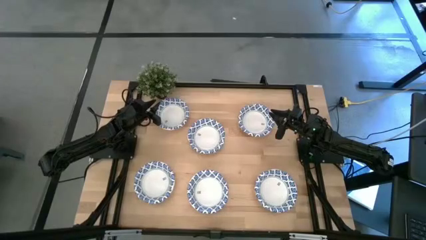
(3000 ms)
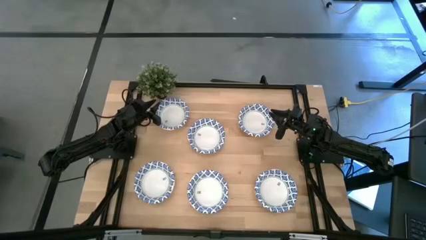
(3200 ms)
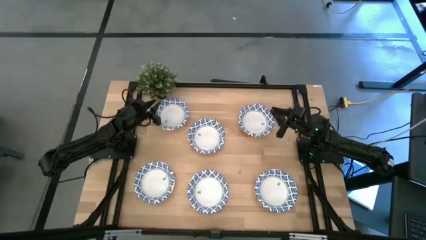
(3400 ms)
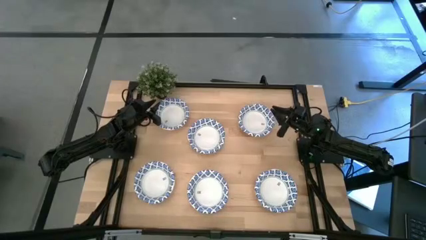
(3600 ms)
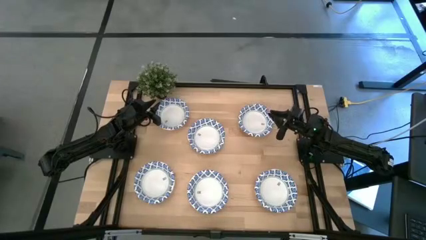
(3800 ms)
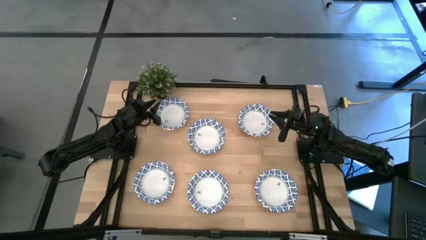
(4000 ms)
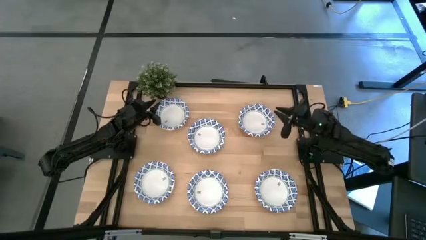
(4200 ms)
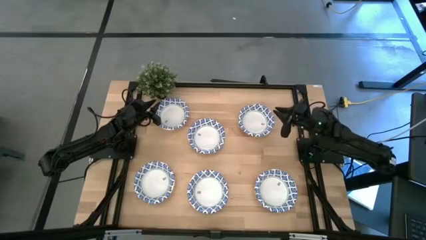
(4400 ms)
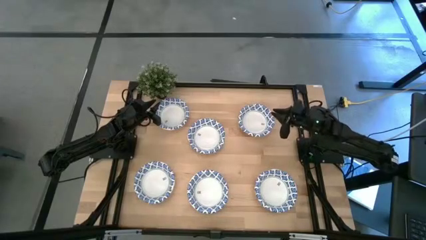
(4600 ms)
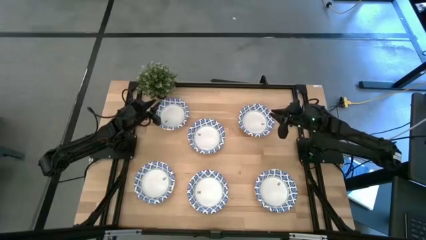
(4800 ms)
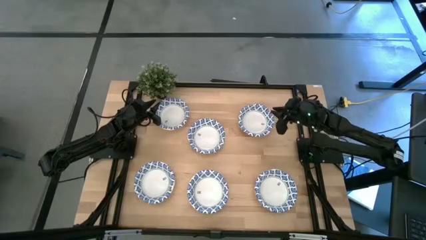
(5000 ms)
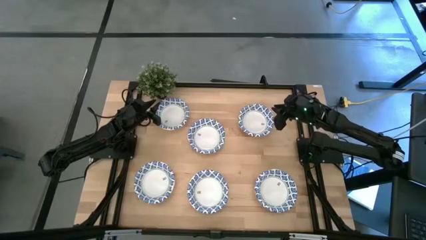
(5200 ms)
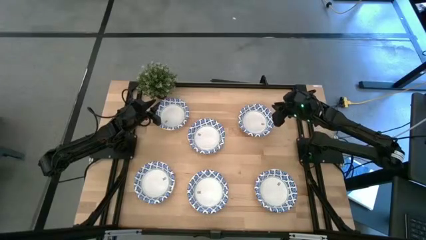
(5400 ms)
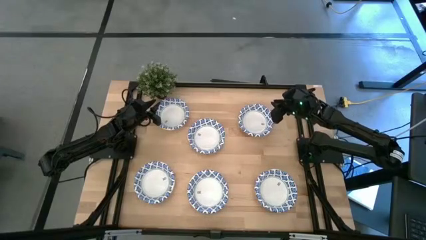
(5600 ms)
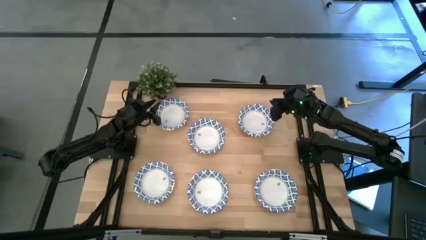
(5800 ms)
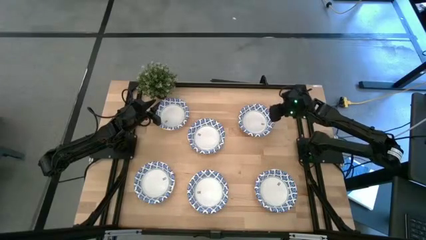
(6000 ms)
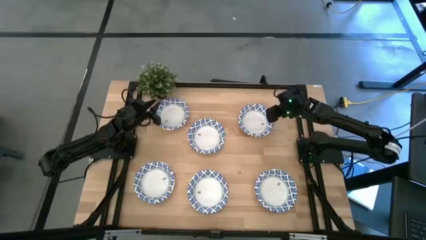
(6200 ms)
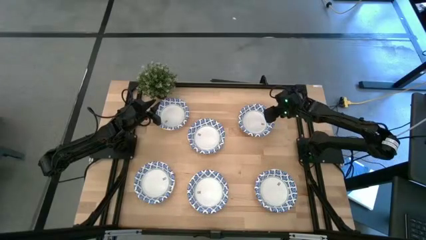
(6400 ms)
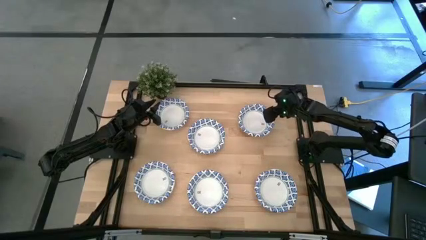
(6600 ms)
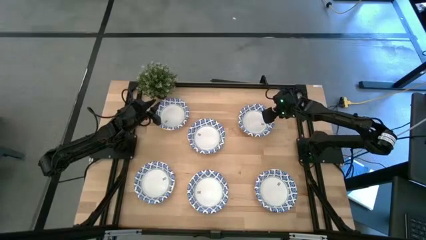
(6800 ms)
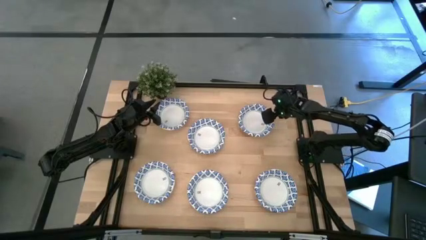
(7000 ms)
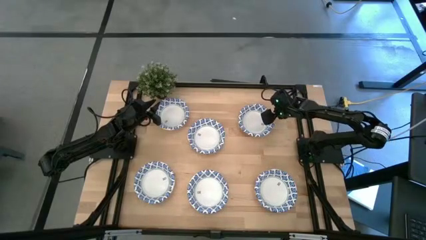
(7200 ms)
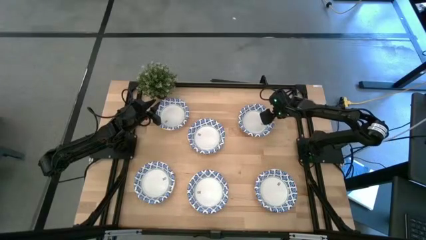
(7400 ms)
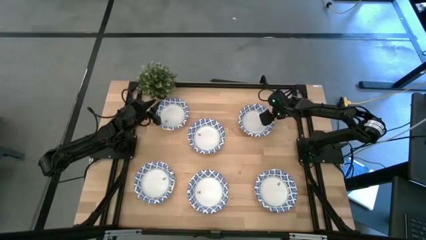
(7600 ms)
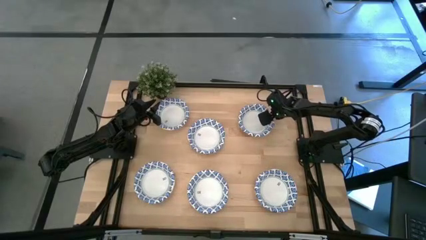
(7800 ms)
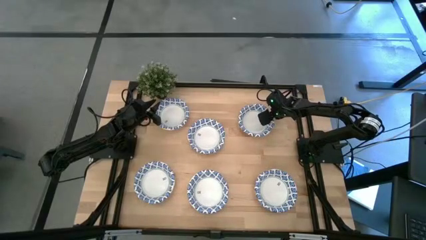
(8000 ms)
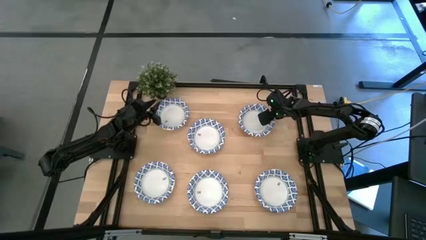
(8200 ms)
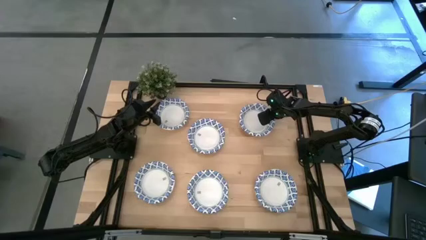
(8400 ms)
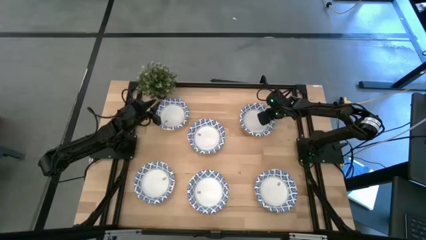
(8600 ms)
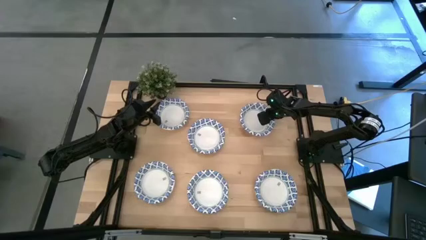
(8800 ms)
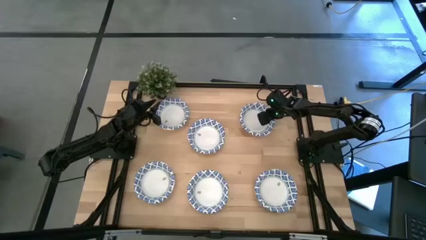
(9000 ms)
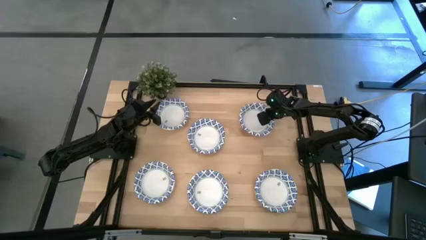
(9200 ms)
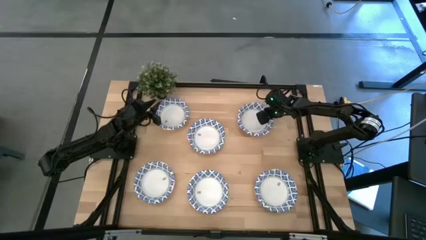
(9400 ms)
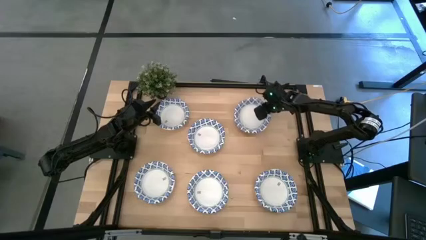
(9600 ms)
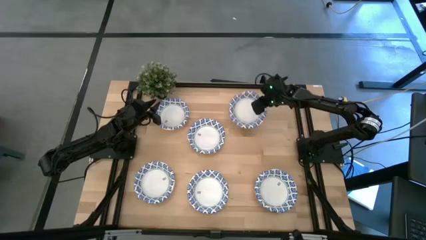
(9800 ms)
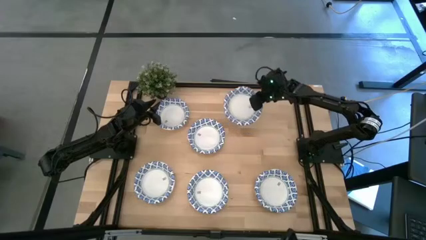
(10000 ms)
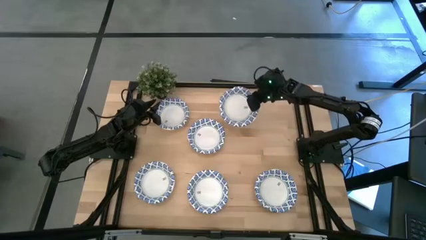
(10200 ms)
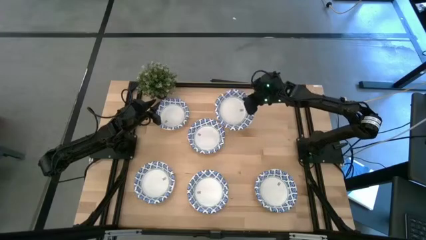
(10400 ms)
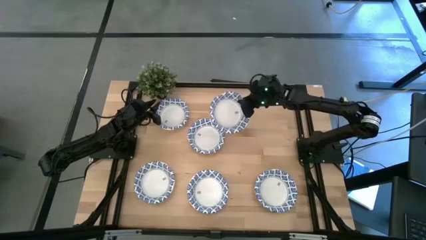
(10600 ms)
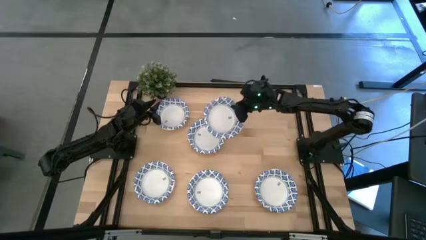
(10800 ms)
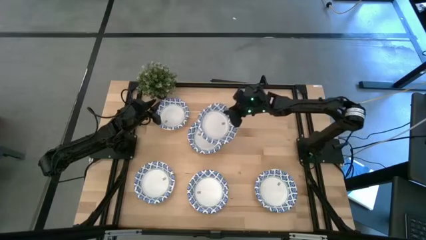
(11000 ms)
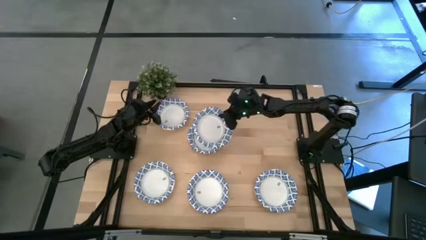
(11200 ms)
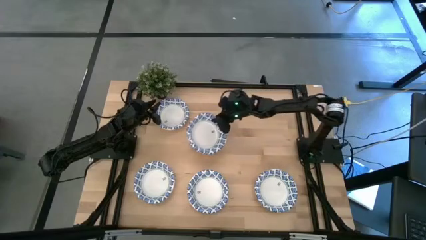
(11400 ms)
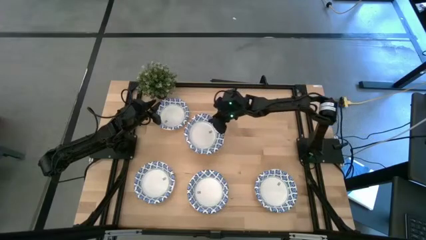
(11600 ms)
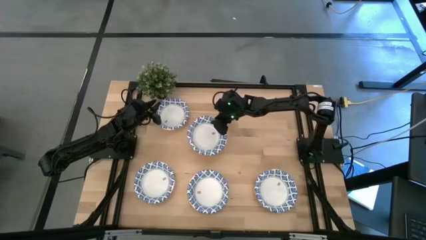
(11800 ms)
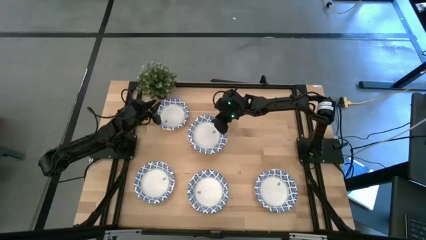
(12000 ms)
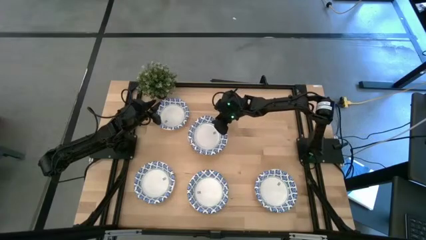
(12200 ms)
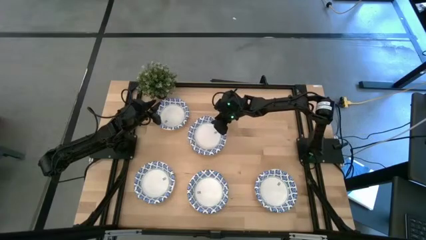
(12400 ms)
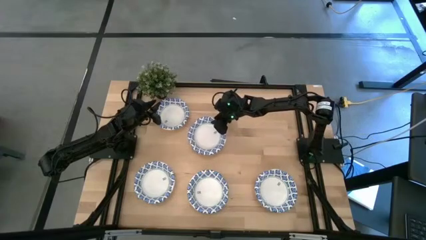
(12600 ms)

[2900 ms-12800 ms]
Task: Nest bowls inside each other
Stack the white patterned bowl on top of the top center white patterned bowl

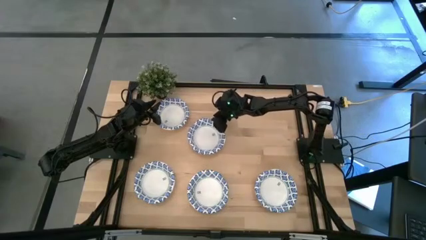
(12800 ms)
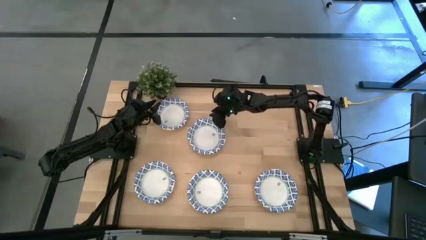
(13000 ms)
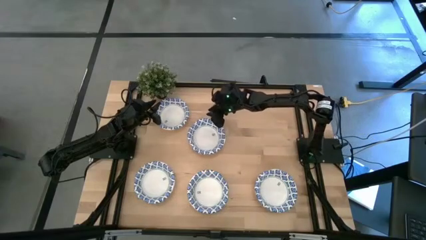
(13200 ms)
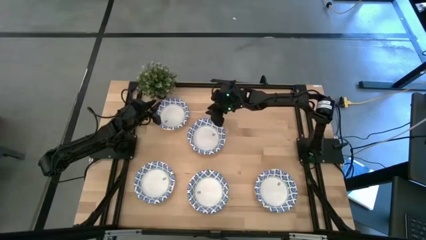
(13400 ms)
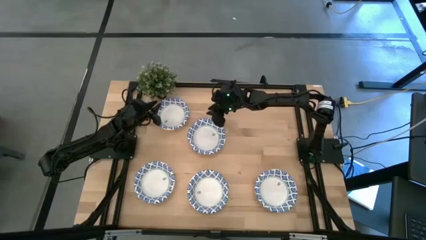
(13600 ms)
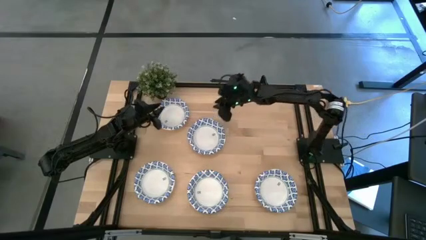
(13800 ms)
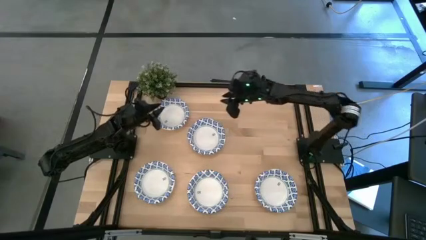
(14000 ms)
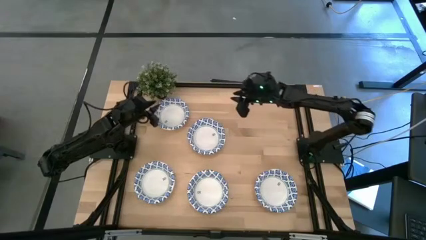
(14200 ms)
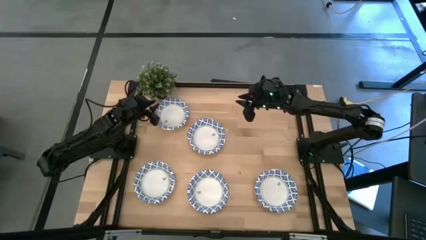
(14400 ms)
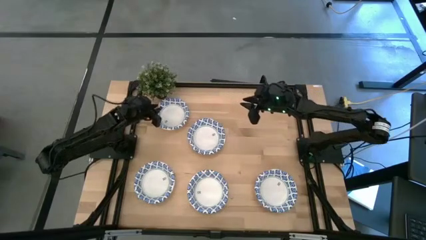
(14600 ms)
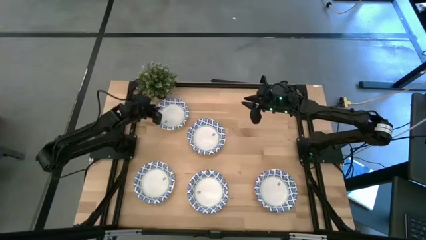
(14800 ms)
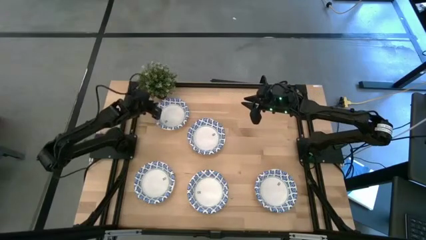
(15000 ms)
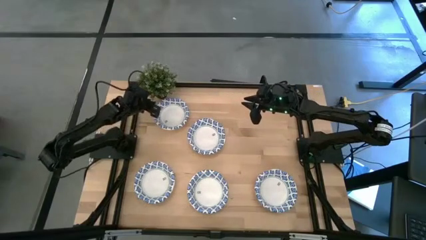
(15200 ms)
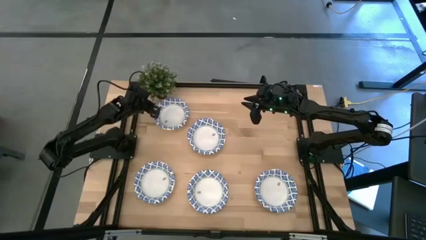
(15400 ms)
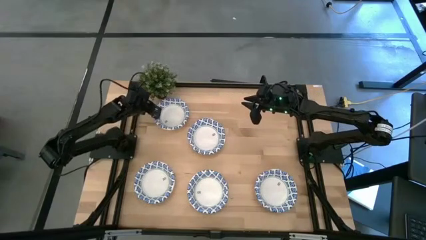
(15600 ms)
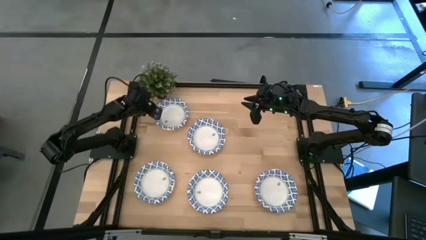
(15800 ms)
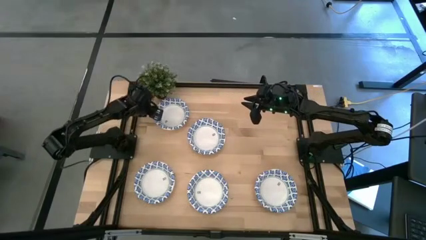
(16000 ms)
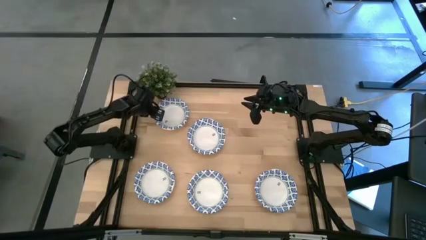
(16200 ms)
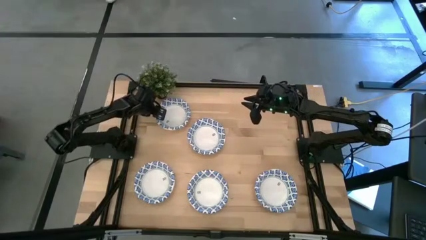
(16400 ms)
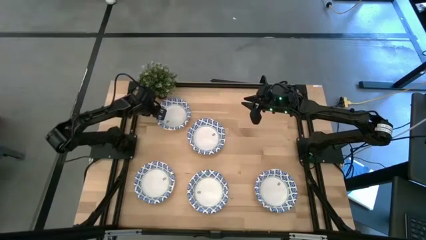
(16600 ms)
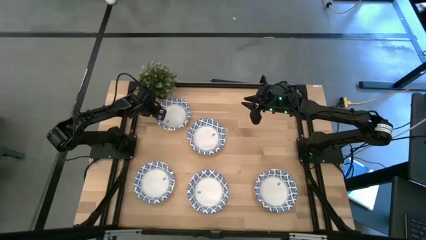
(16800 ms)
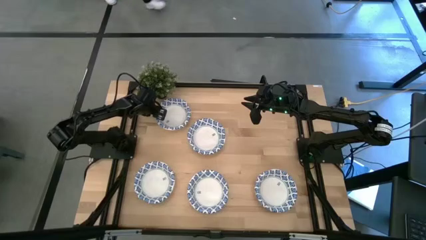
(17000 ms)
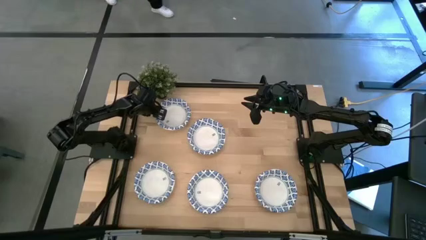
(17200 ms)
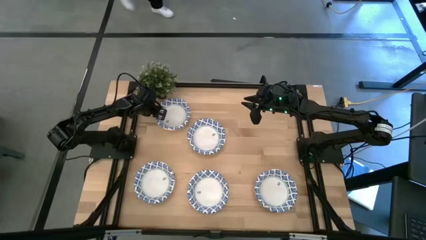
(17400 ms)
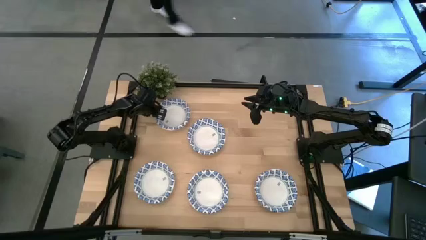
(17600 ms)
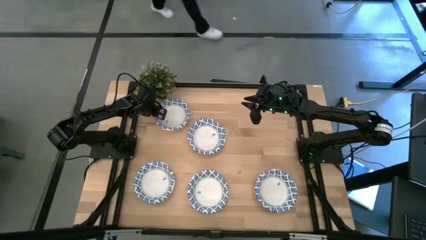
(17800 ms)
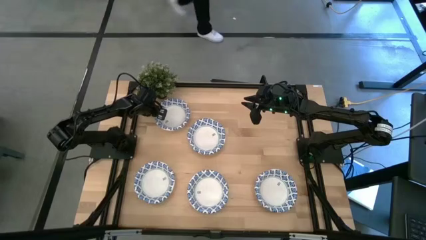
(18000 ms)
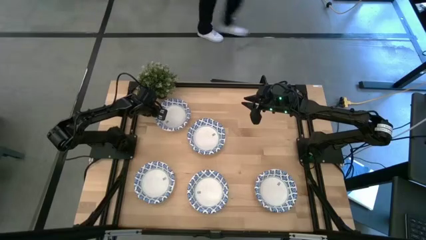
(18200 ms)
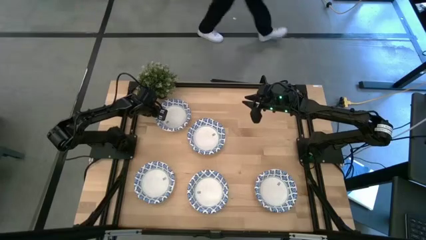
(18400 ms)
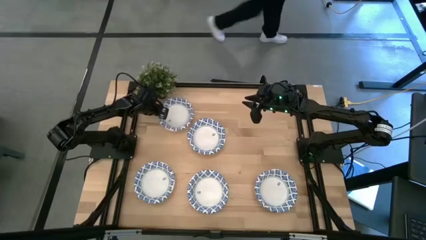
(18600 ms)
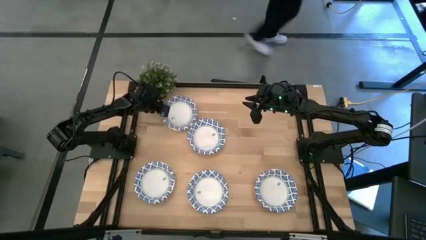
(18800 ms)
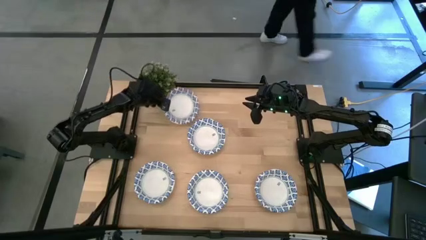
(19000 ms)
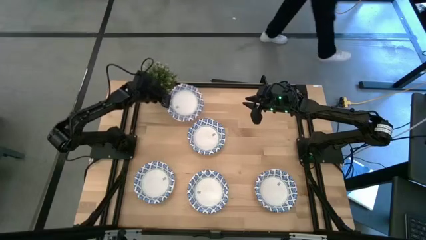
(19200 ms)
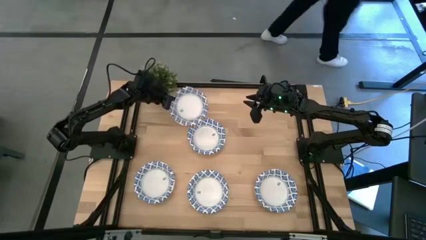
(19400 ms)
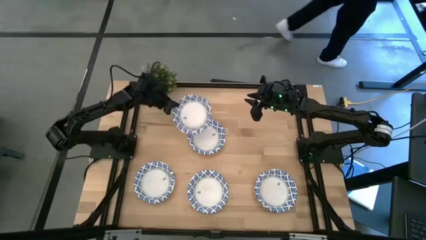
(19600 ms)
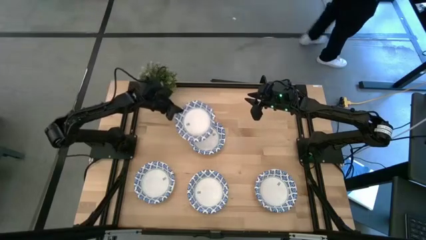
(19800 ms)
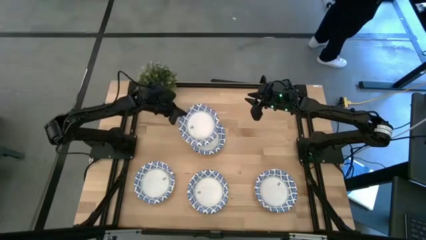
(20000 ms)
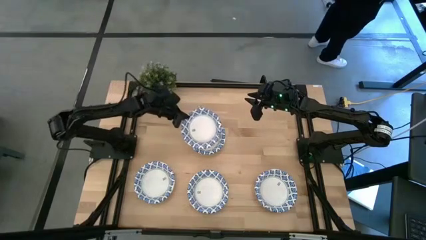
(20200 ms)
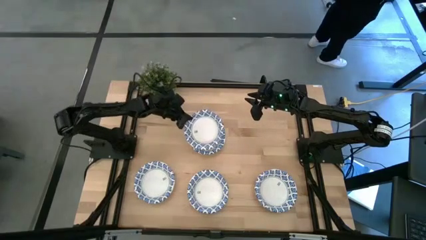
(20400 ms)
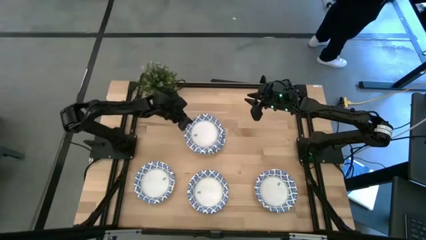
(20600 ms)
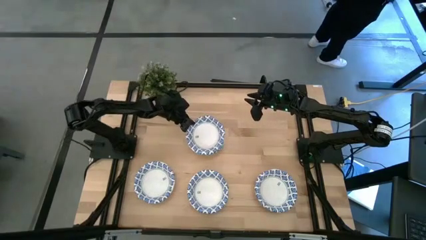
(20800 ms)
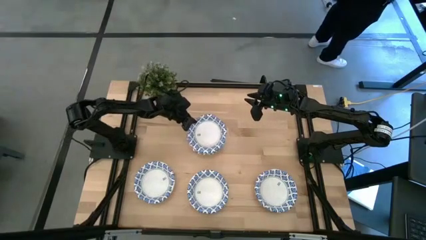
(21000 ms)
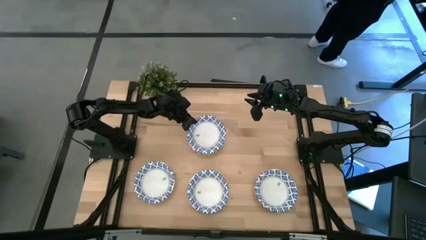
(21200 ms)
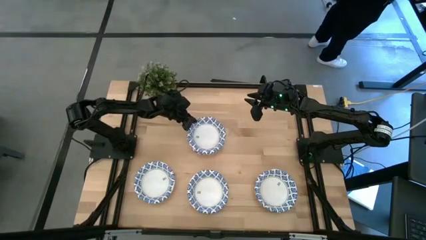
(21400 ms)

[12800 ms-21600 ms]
Stack the white patterned bowl on top of the top right white patterned bowl
